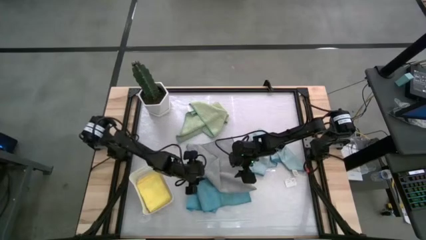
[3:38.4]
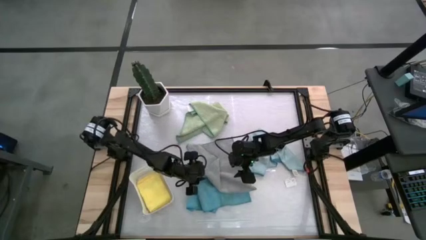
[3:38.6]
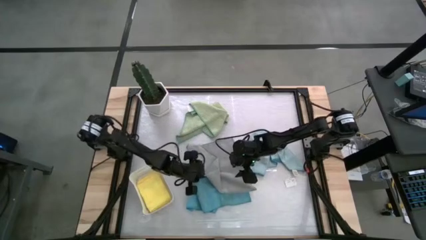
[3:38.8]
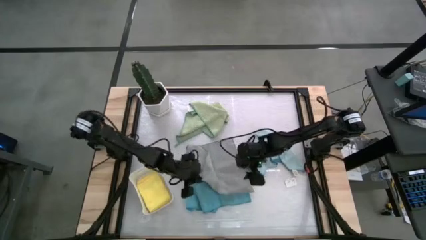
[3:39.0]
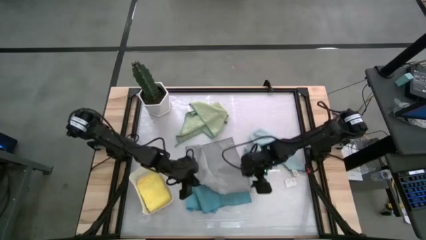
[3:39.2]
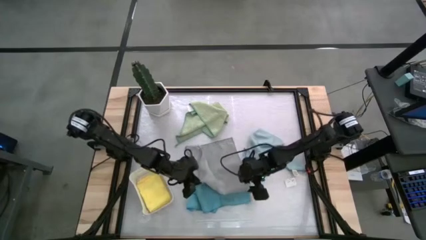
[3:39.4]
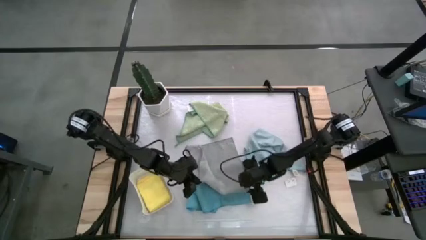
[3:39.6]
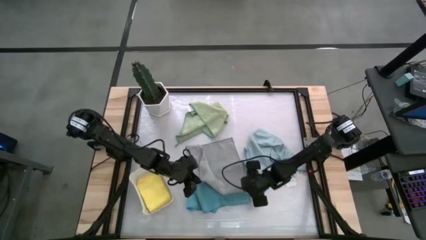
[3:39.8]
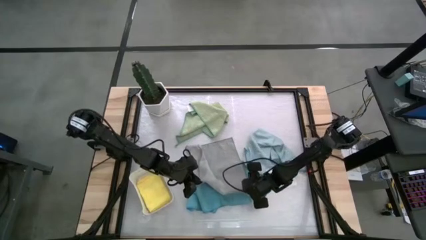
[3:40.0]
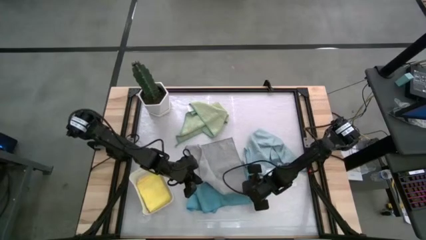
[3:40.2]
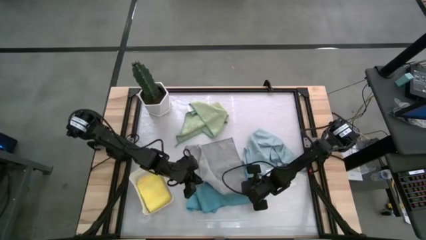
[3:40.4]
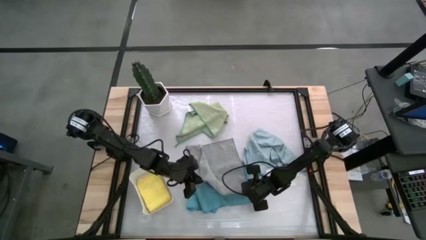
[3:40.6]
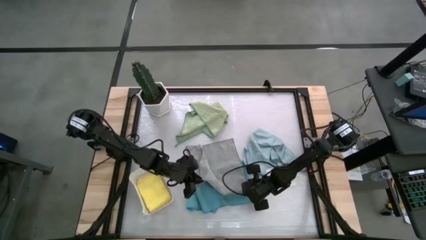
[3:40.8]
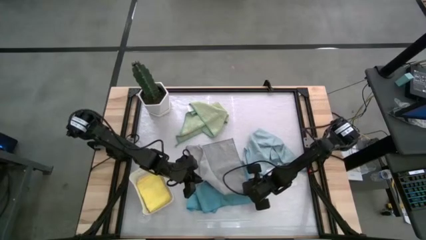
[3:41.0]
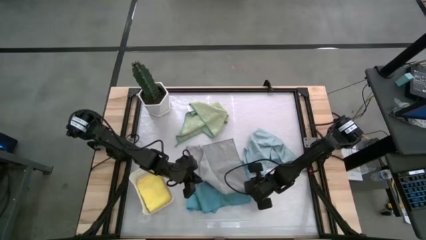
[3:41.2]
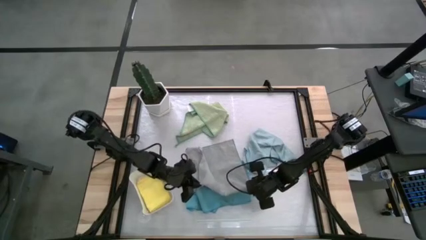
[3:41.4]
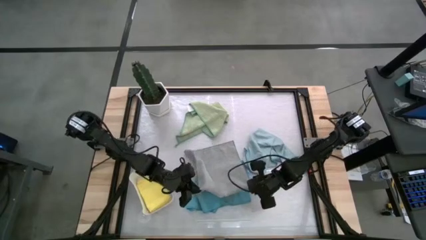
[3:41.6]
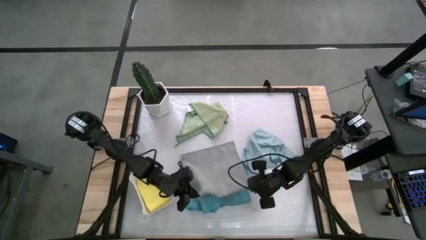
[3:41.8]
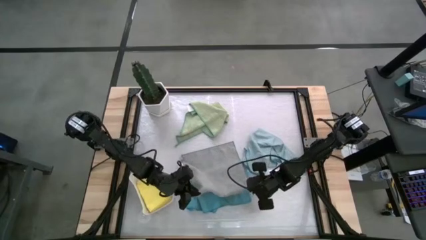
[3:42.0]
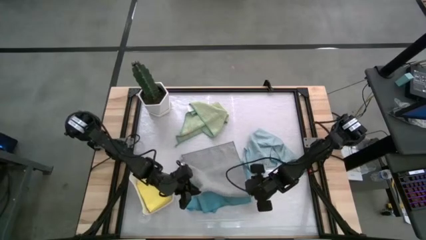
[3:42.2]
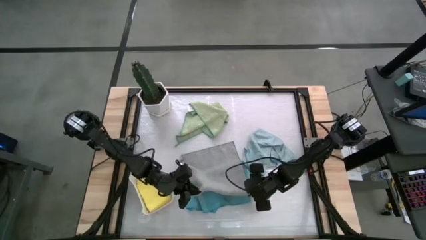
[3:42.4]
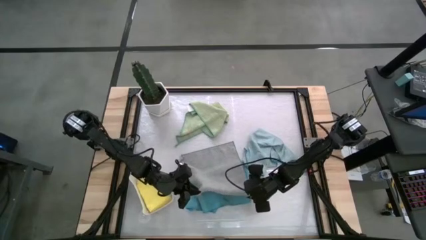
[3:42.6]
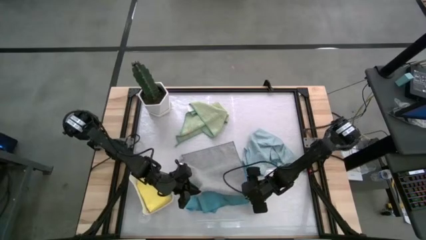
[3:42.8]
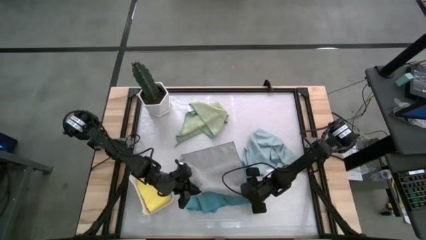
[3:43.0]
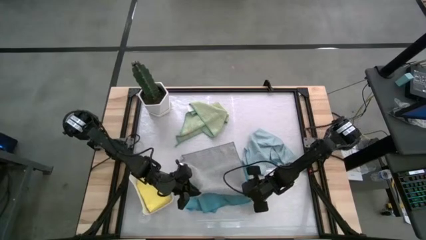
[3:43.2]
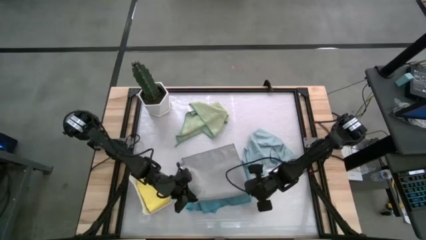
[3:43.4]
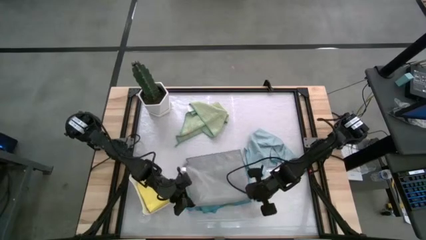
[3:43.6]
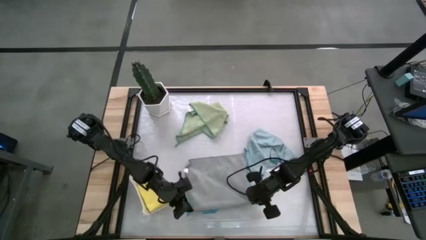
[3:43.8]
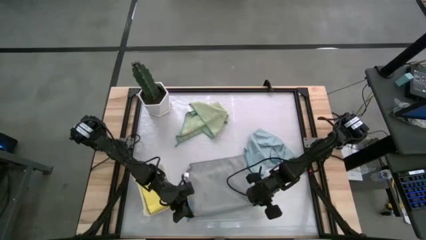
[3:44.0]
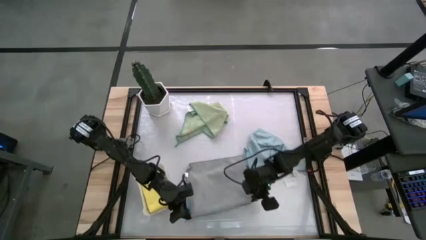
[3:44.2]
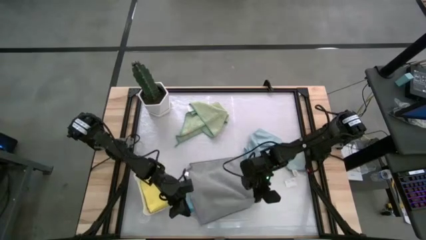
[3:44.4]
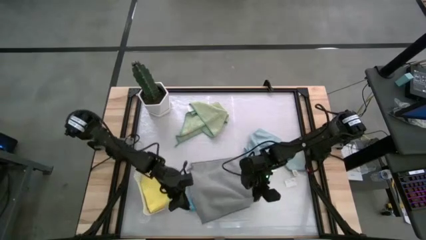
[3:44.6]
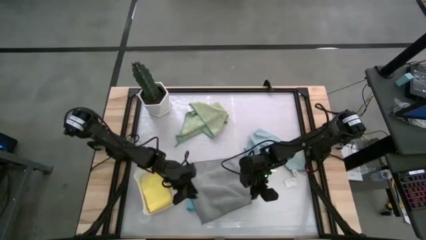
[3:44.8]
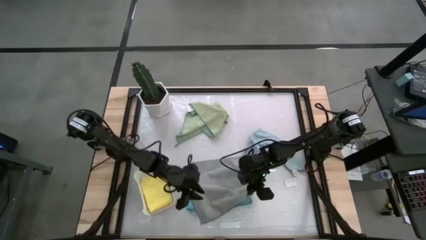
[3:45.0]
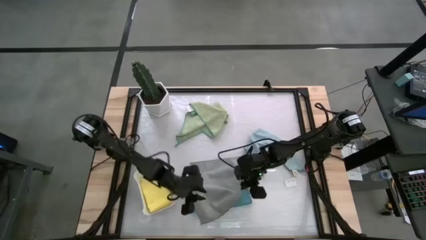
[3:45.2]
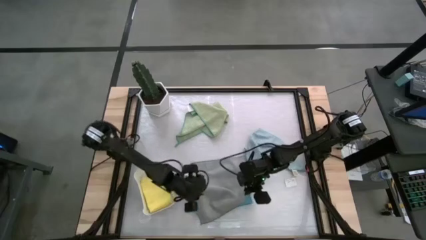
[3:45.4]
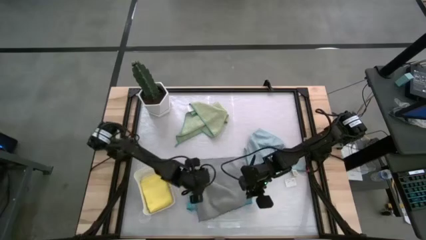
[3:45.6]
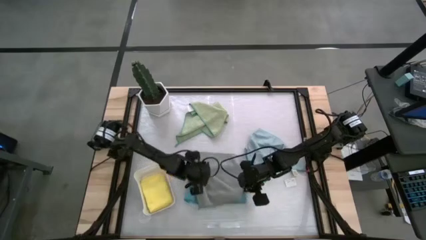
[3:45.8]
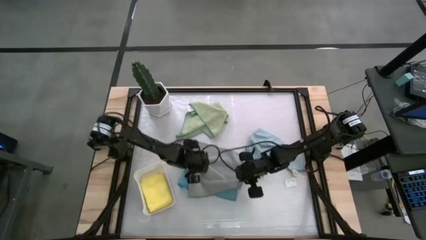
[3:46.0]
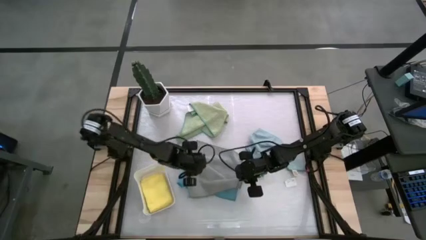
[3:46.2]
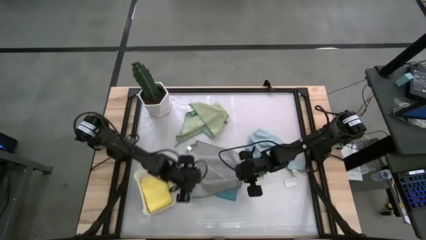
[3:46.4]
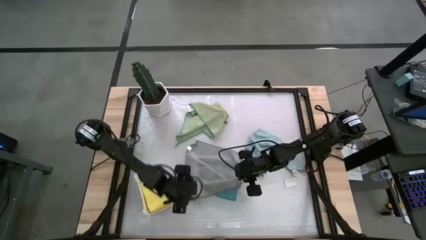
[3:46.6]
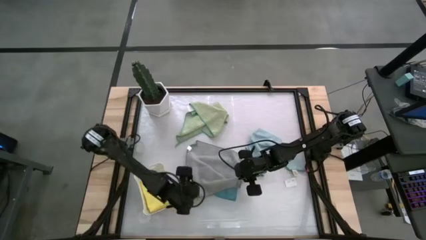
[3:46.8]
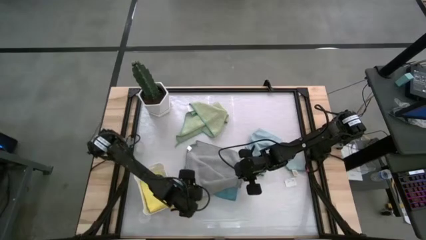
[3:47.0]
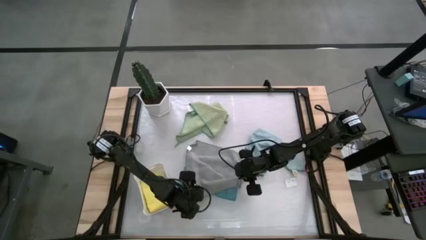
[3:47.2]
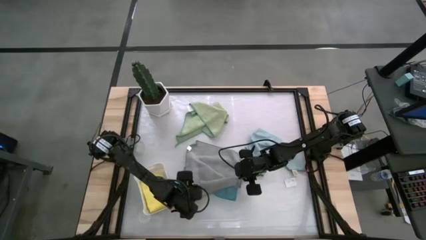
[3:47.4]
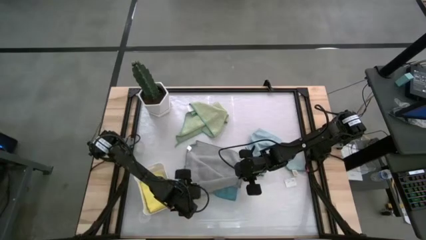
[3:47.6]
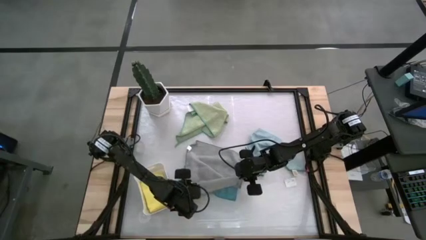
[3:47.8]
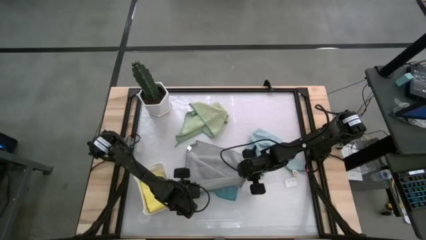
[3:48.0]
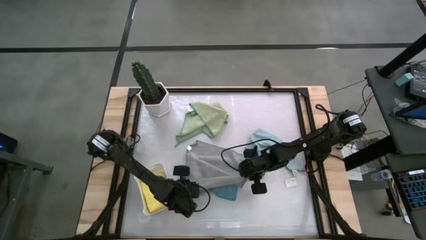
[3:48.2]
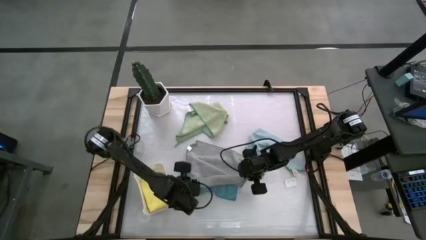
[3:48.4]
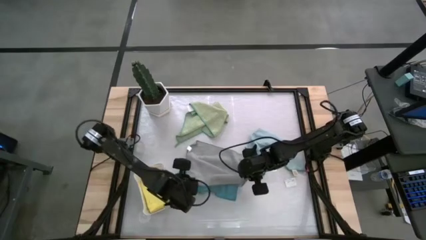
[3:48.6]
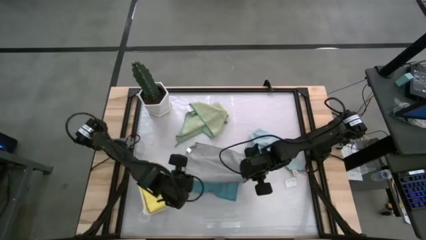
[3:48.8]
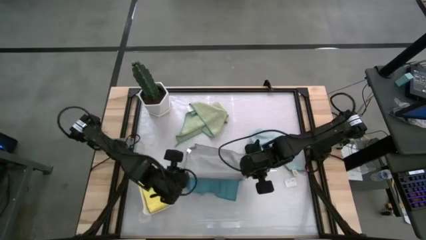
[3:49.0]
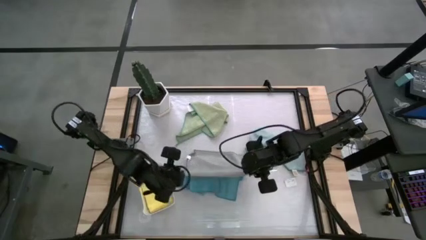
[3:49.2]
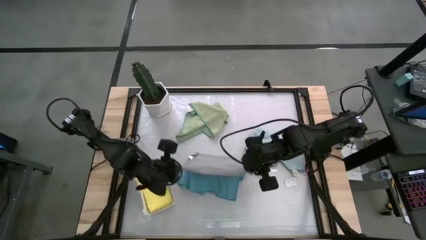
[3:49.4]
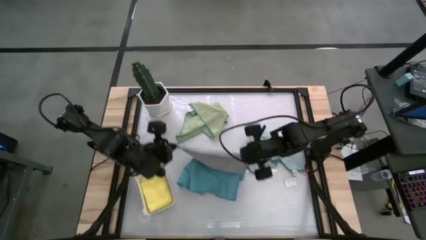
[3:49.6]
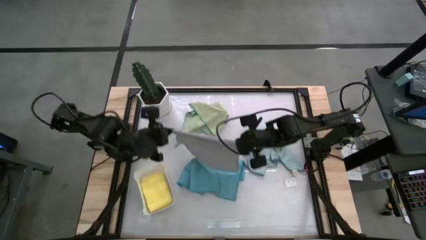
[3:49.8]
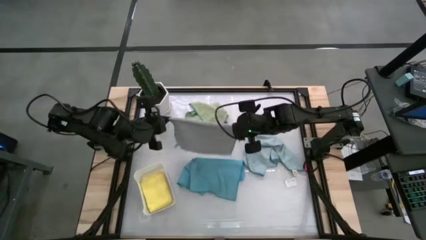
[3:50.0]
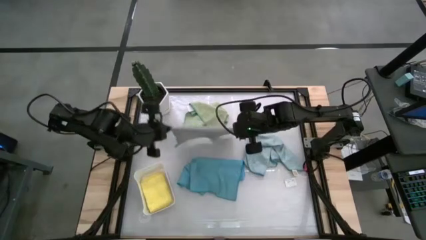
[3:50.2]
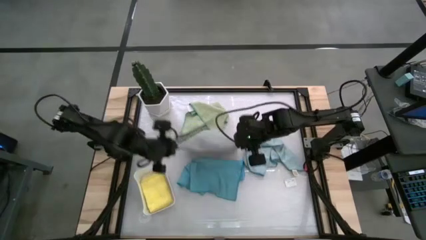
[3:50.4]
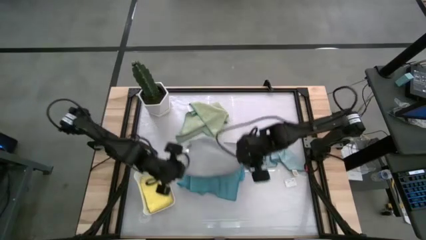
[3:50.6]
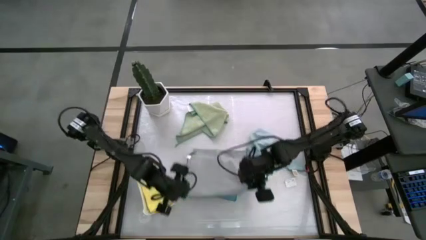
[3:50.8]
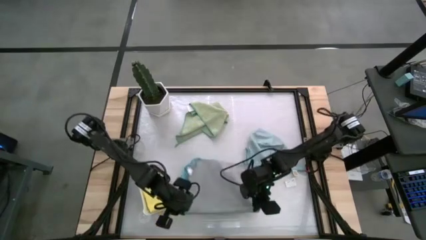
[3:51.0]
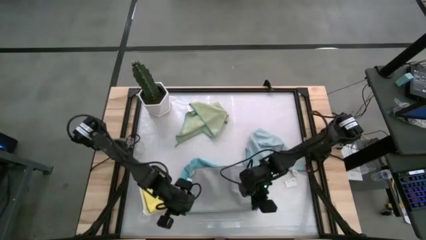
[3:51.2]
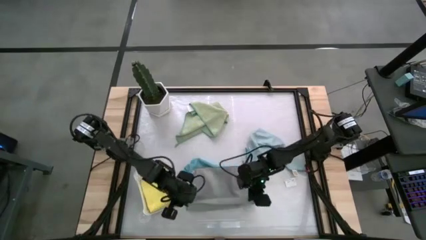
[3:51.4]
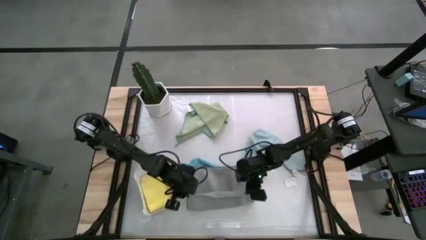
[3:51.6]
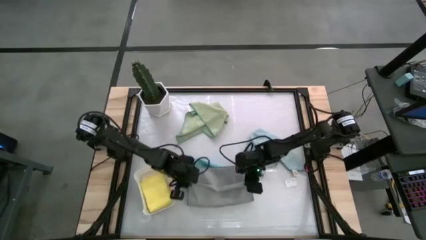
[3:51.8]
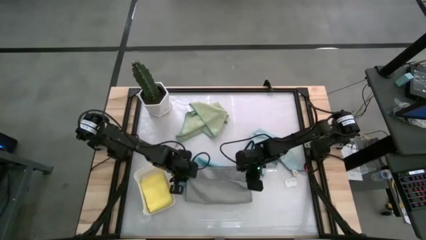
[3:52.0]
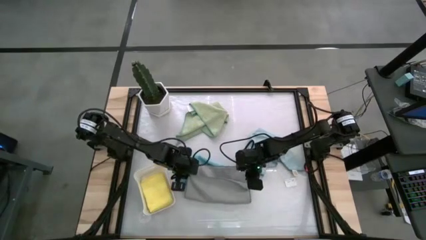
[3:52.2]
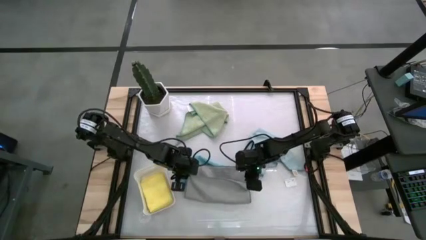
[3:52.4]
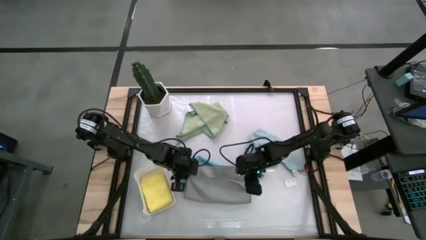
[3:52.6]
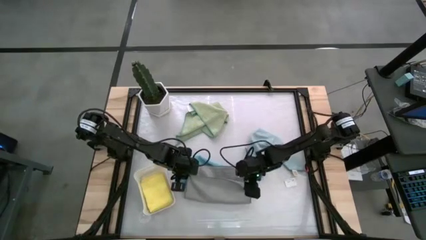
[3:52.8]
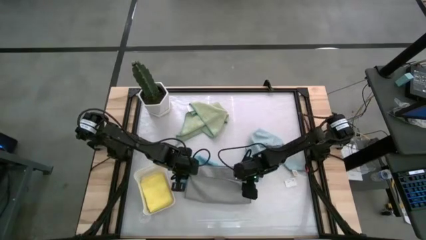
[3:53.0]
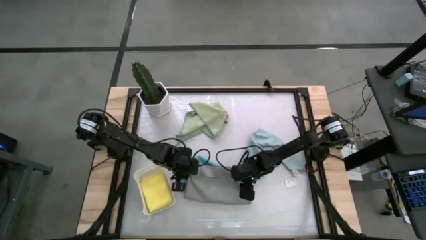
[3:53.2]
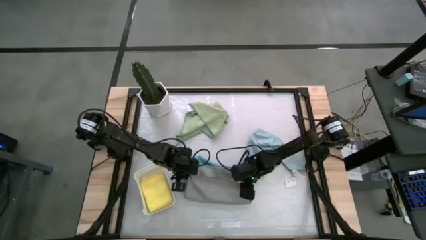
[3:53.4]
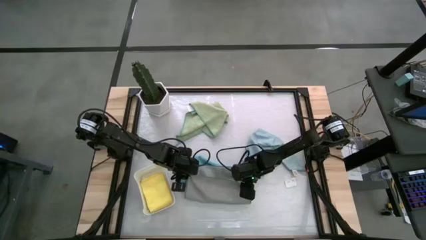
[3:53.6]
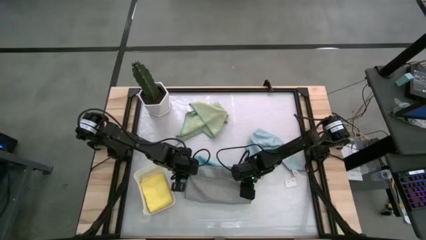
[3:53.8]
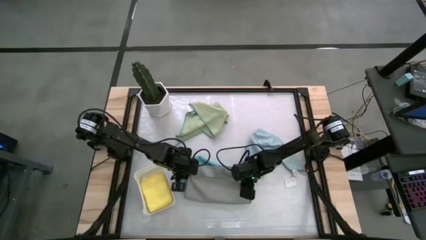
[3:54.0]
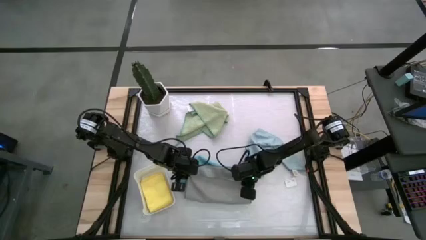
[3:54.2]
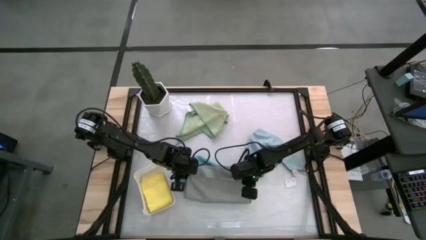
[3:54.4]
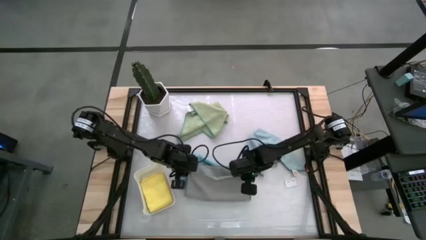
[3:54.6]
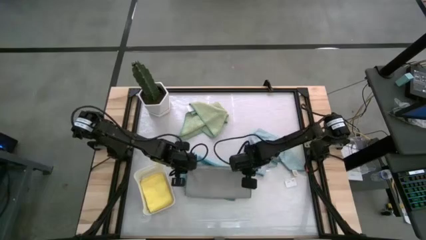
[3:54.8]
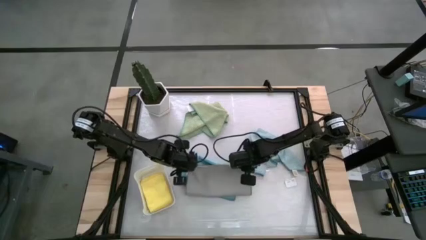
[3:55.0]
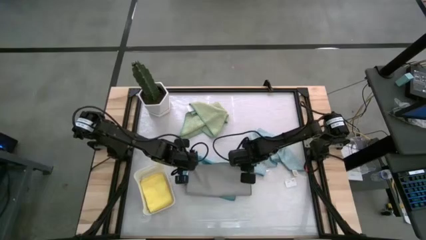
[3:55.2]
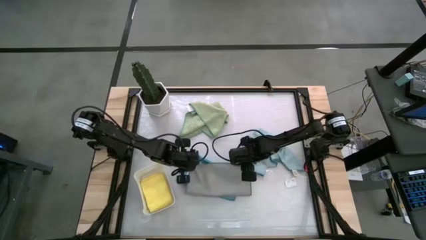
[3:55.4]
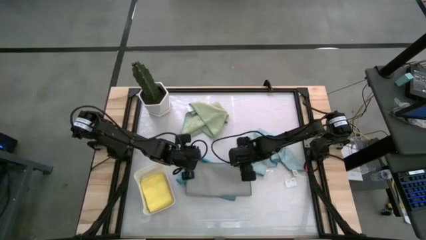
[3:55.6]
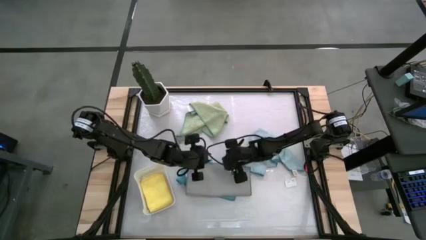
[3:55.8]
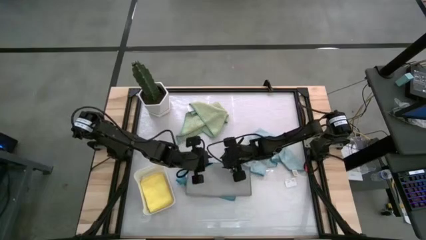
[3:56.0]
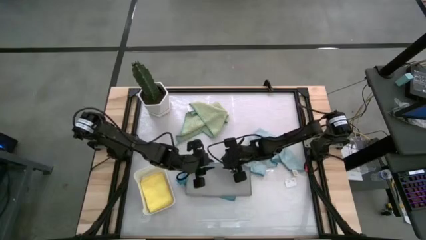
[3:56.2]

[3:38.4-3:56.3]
Task: Fold microfiber towels
Fold the gray microfiber towel
